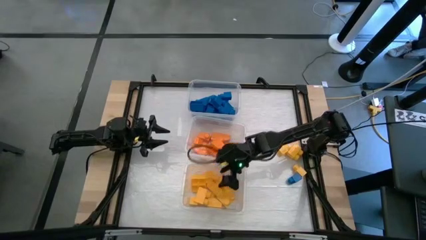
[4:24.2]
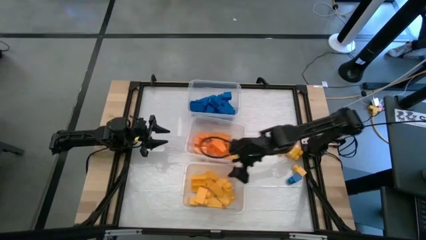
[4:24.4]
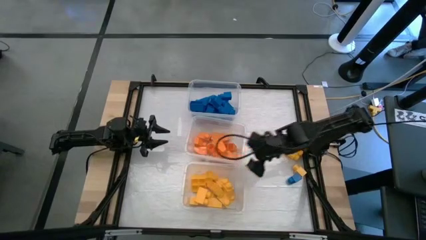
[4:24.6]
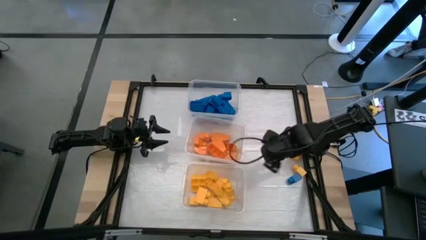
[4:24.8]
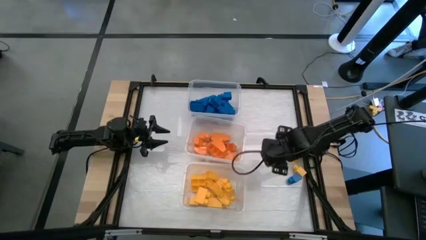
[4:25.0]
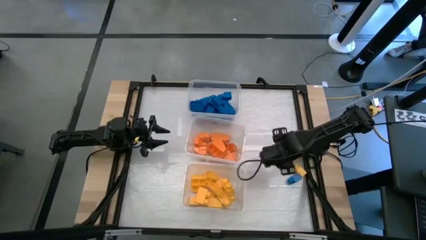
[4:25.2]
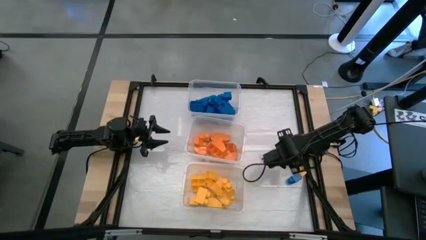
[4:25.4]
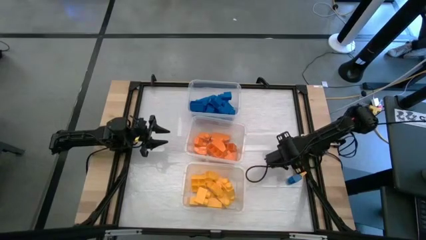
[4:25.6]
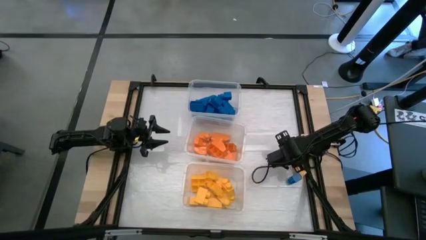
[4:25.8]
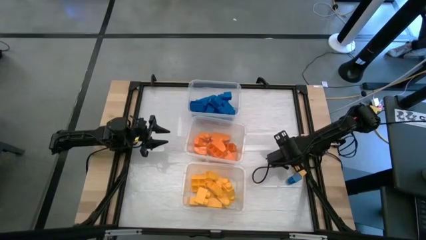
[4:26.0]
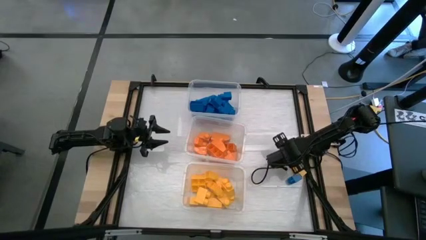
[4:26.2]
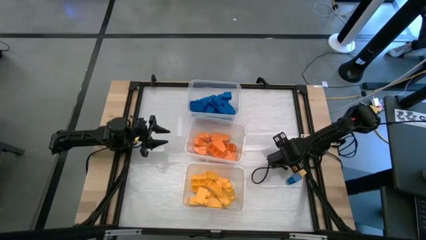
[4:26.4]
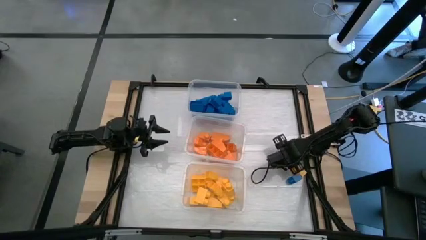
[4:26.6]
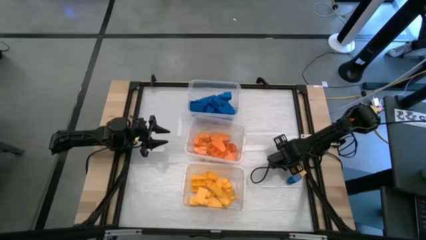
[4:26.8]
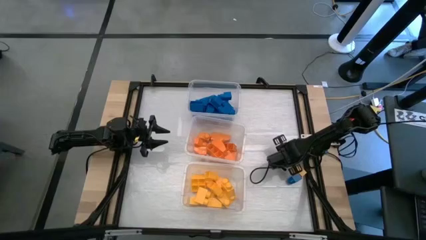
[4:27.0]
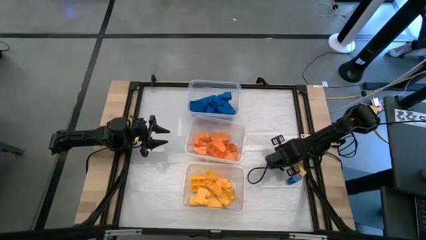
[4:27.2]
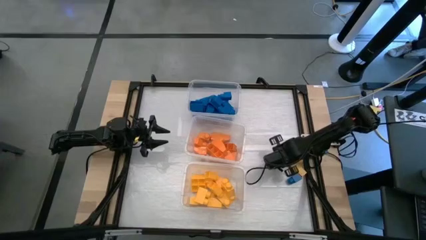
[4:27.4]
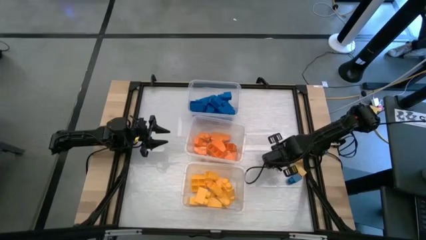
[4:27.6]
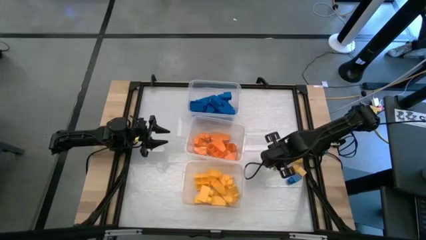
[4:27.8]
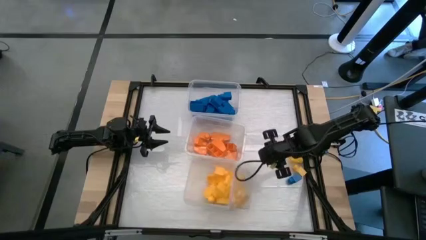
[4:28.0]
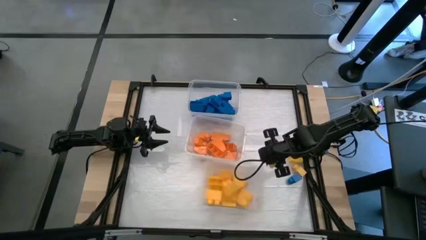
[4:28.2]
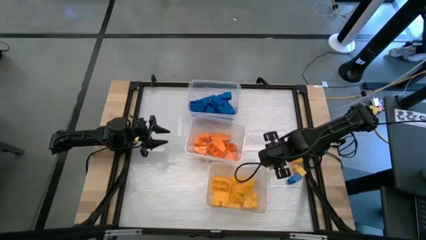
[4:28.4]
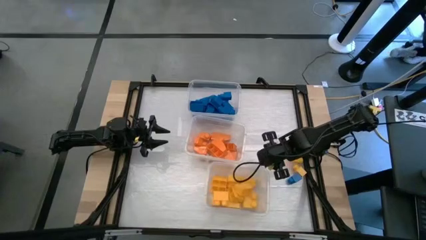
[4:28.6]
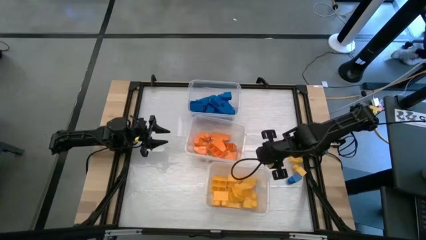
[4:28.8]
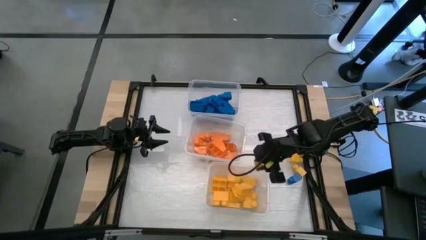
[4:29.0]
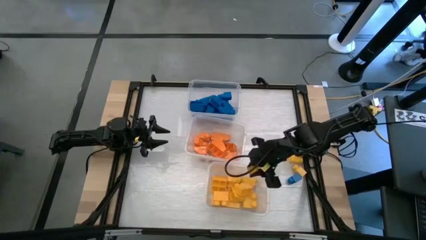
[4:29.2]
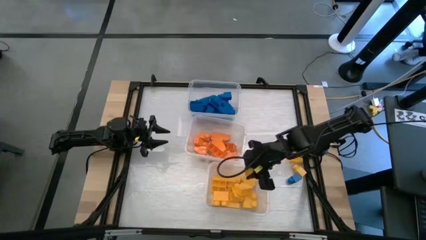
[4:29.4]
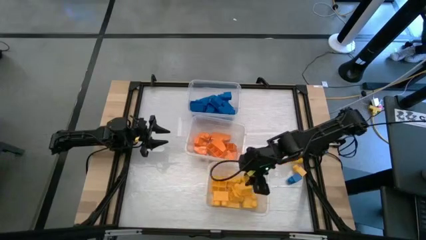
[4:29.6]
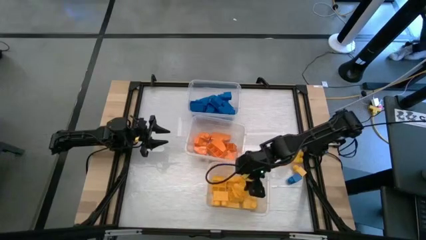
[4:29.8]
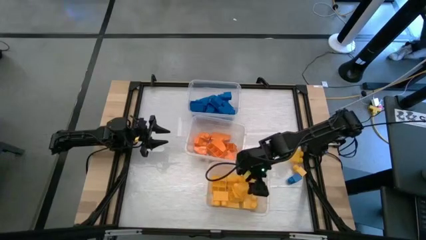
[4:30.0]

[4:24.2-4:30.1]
Task: Sort blocks
Put the yellow game piece into the bottom transparent bin

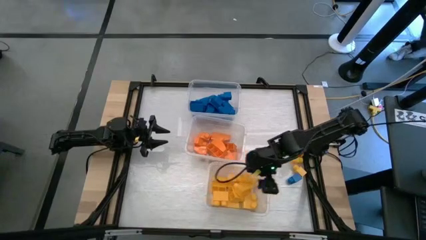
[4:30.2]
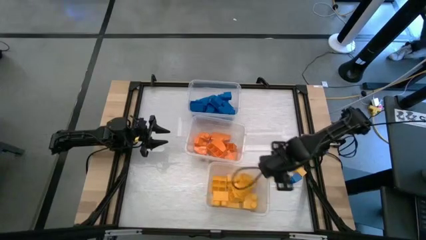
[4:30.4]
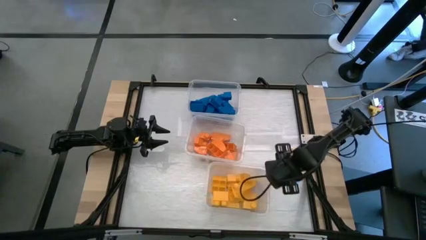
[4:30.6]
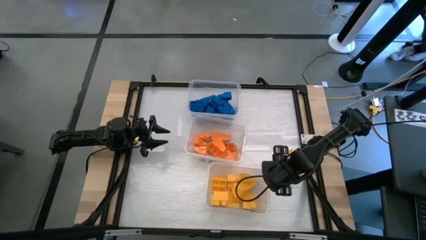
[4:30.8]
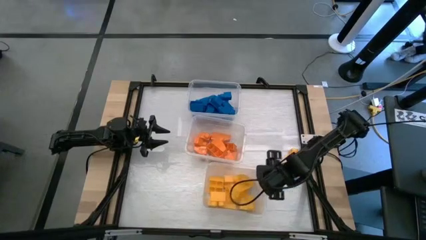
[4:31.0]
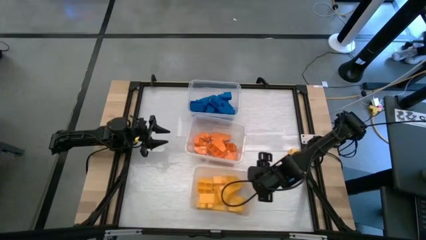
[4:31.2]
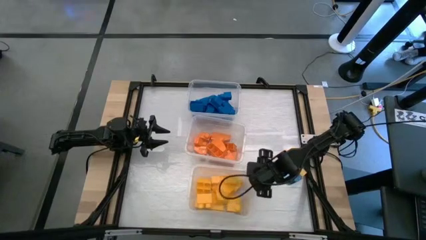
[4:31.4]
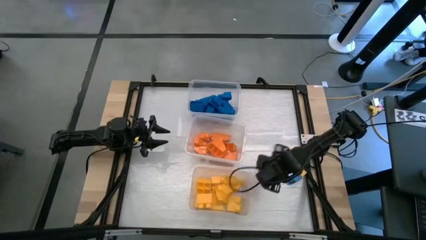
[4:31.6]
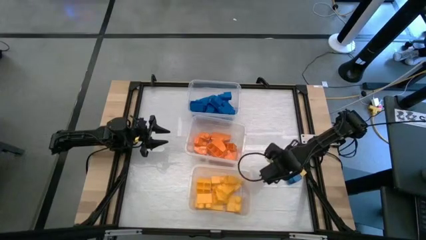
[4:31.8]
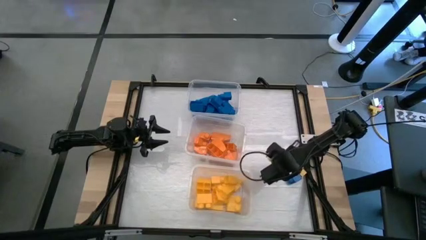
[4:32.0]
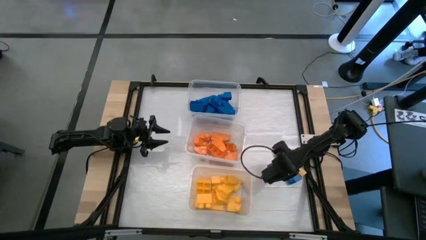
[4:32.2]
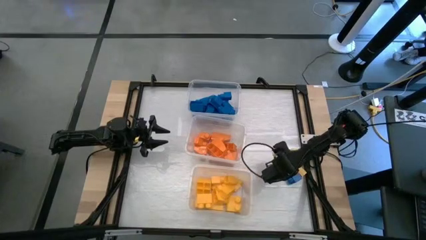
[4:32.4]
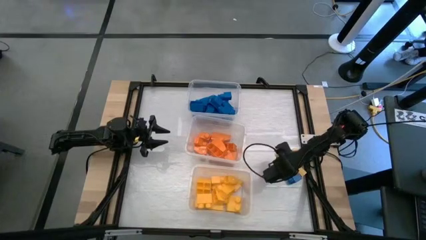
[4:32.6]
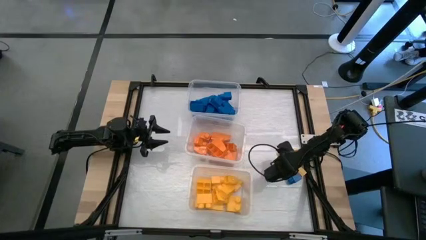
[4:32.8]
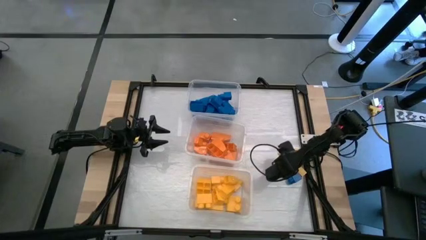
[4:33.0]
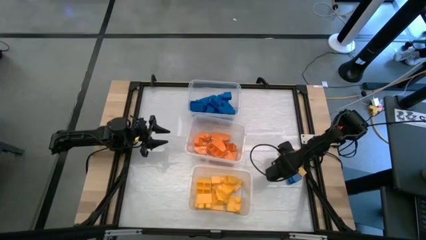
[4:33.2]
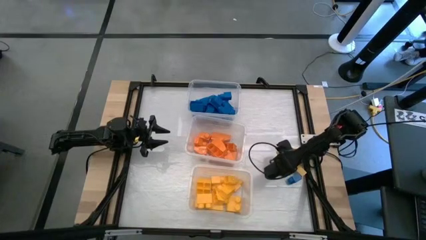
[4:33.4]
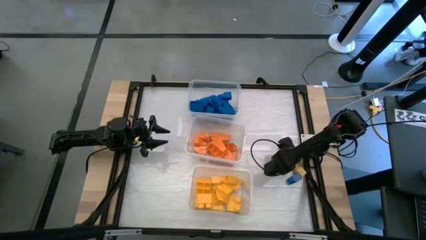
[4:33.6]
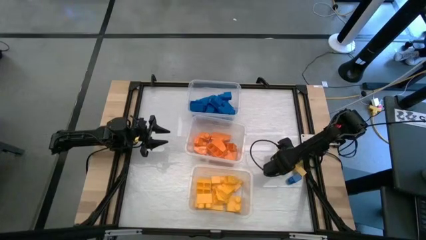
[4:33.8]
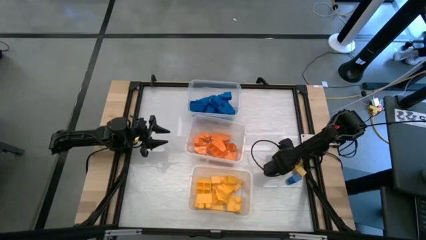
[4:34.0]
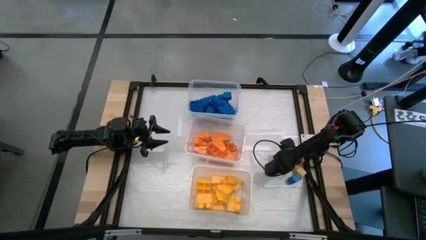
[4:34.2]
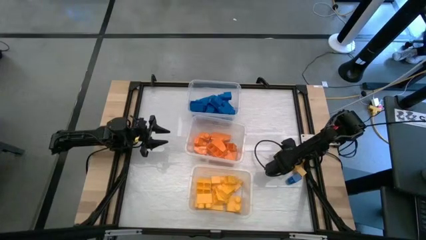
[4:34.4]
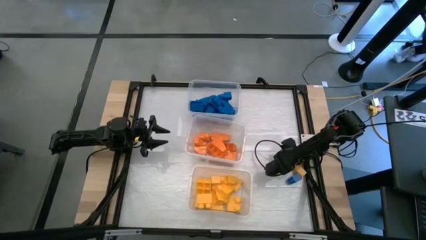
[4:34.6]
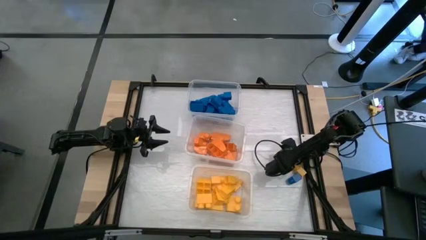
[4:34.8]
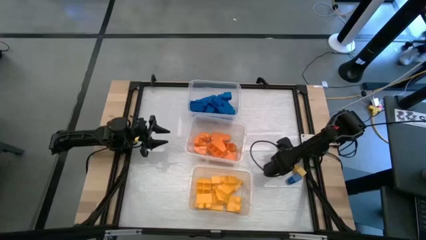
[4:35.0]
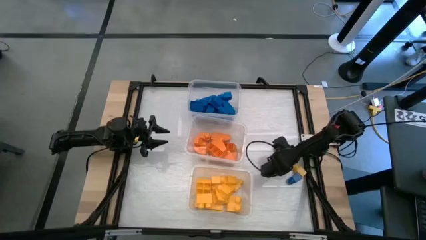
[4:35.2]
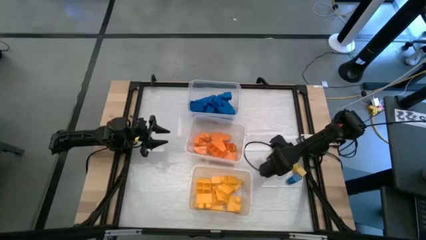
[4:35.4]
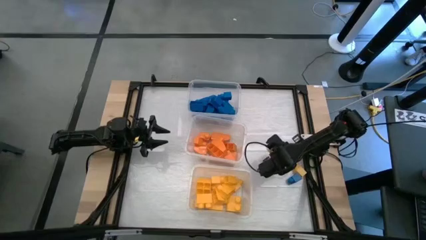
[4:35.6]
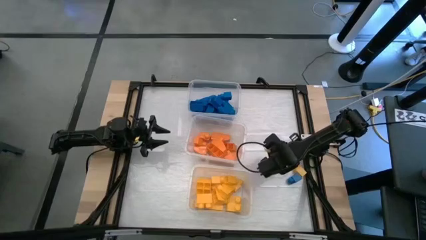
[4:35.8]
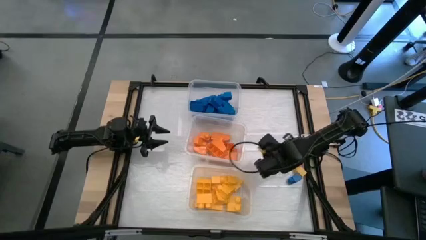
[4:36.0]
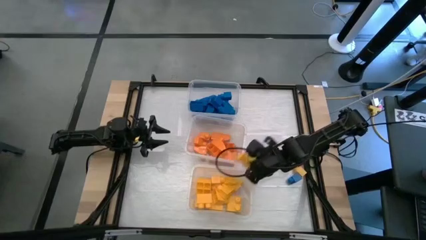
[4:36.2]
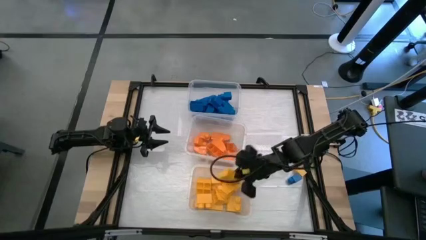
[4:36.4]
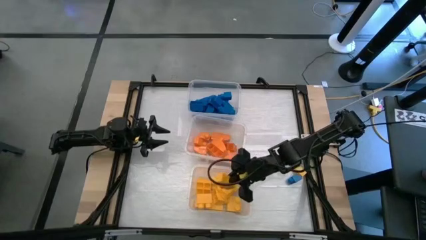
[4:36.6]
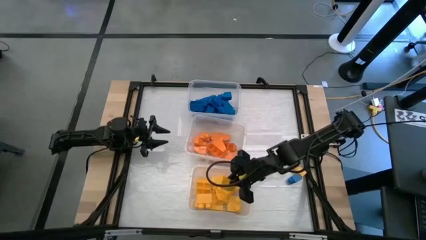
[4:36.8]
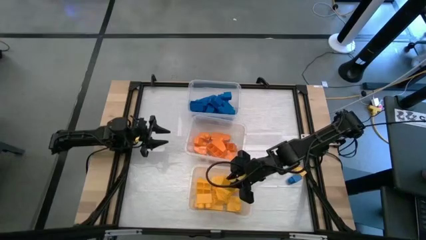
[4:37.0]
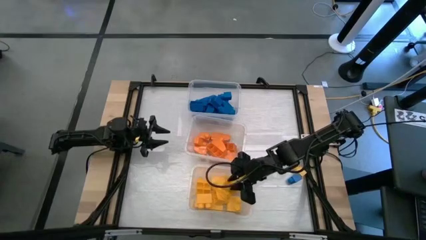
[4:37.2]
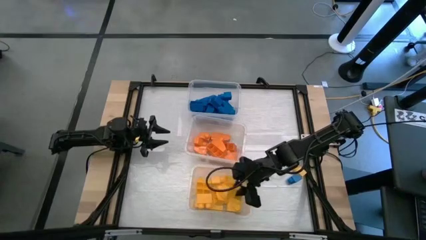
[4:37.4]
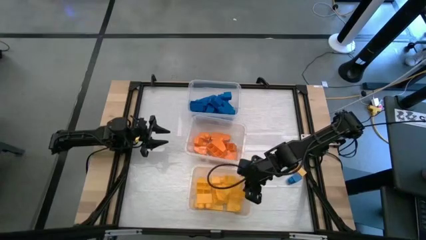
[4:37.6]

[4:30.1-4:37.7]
Put the yellow game piece into the bottom transparent bin

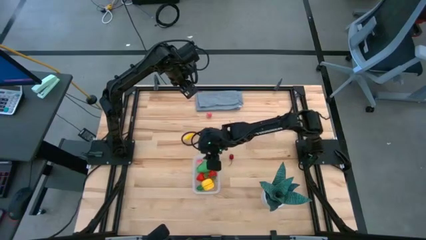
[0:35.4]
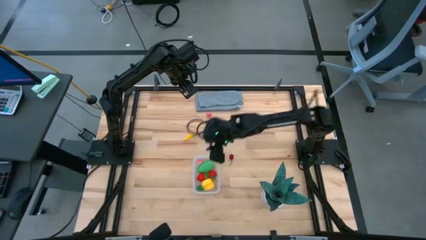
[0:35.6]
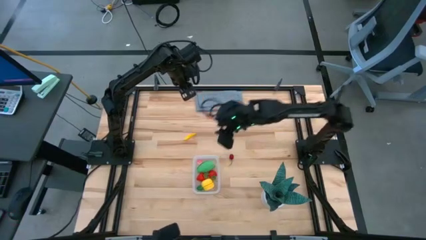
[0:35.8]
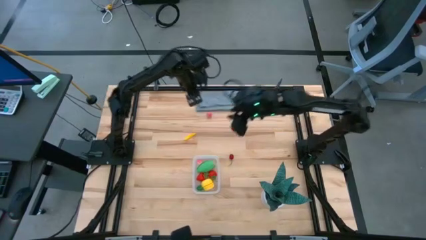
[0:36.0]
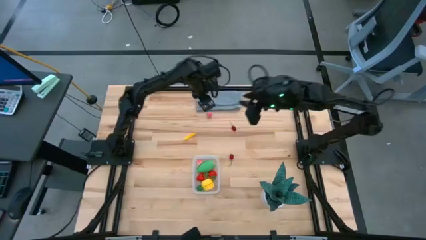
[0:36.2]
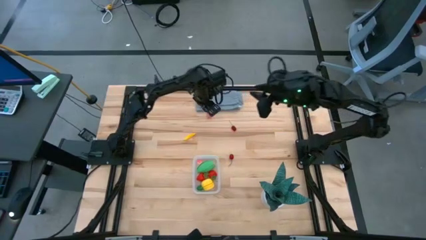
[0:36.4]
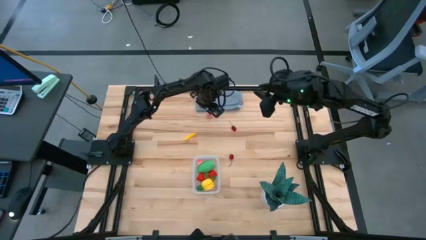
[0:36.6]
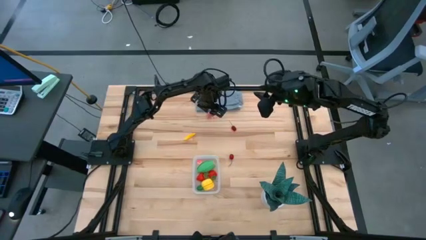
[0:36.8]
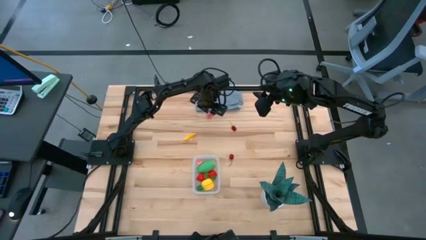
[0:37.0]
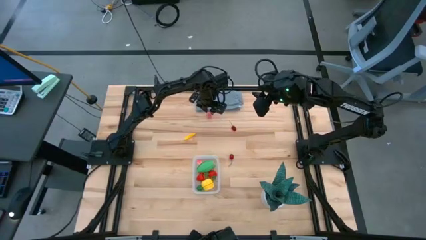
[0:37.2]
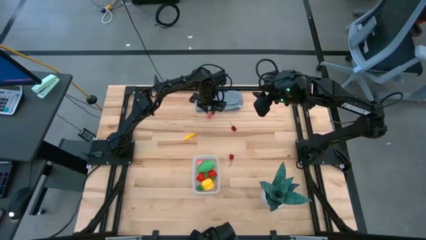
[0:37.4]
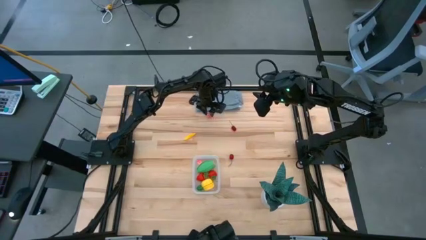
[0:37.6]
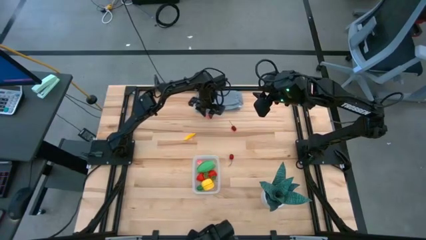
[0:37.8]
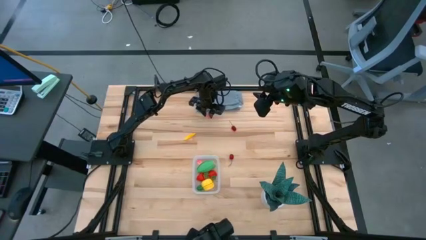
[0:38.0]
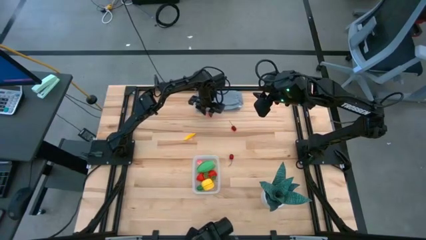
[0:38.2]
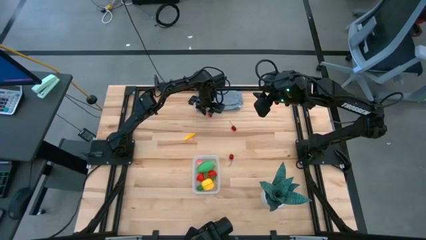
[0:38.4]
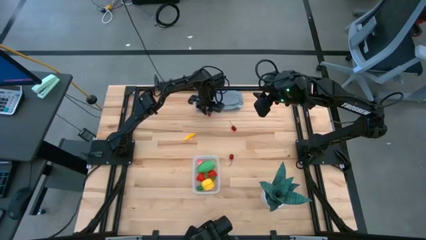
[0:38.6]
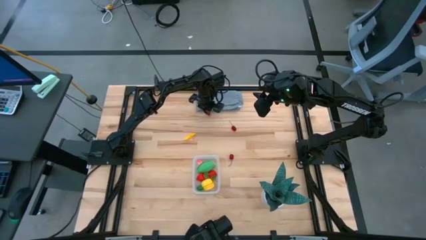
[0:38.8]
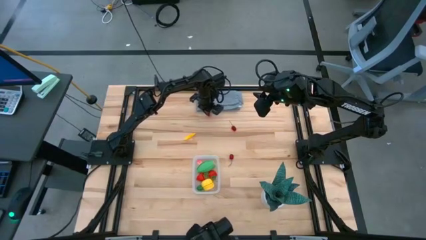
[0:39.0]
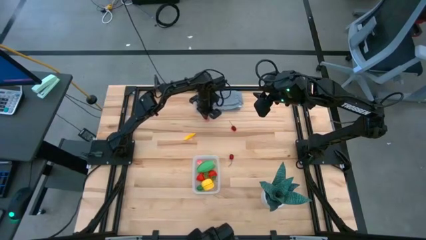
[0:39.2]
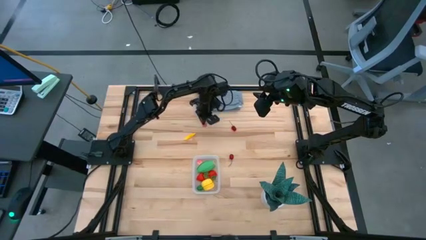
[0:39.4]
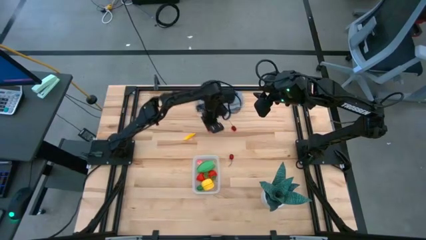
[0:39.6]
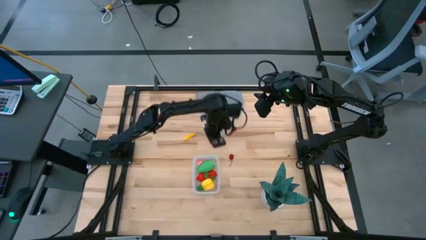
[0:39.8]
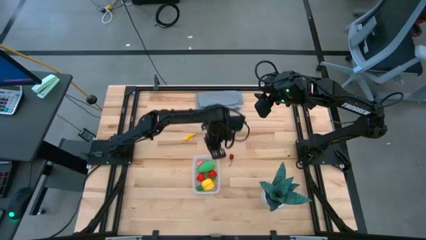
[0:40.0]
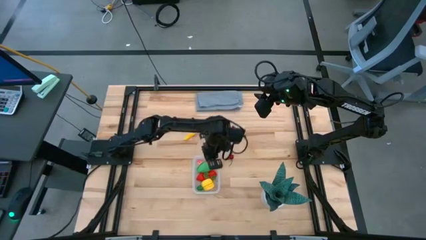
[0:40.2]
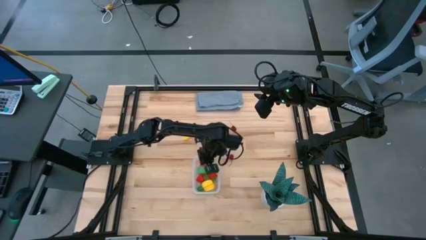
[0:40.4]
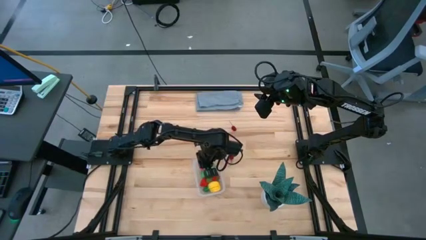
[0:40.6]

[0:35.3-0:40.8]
Task: Pick and placing Produce into tupperware
Put the peach into the transparent bin
